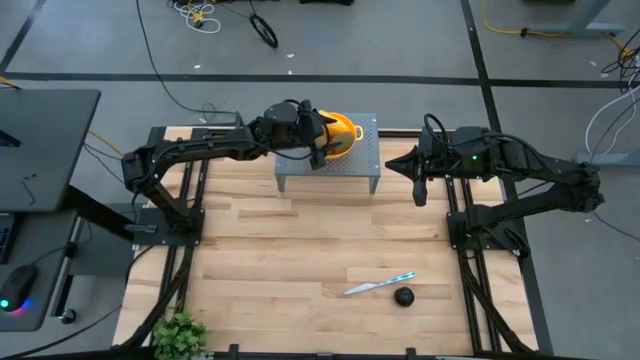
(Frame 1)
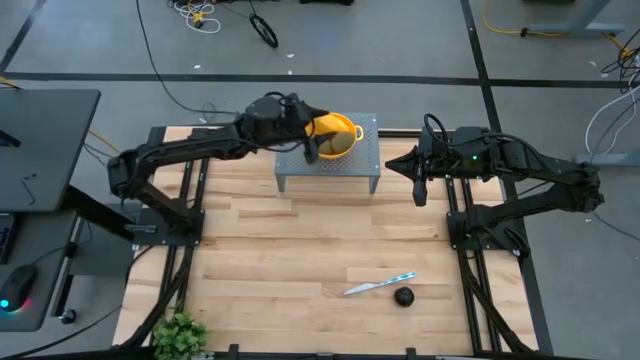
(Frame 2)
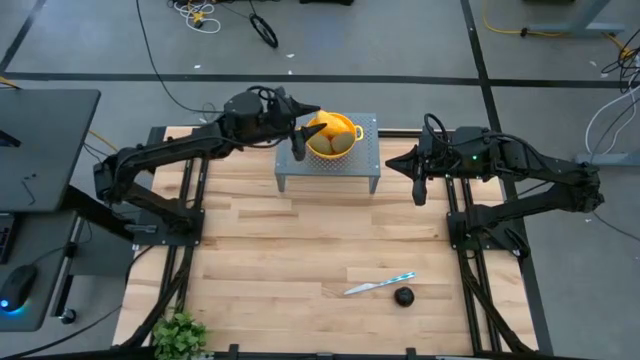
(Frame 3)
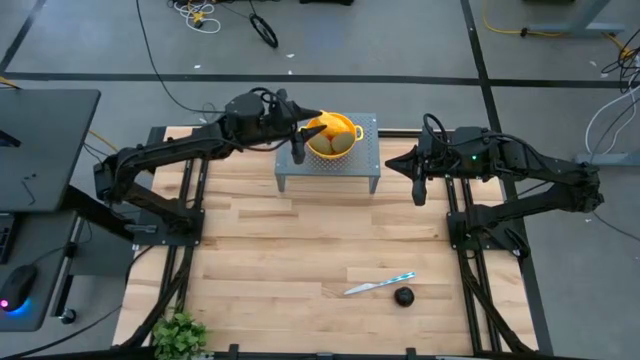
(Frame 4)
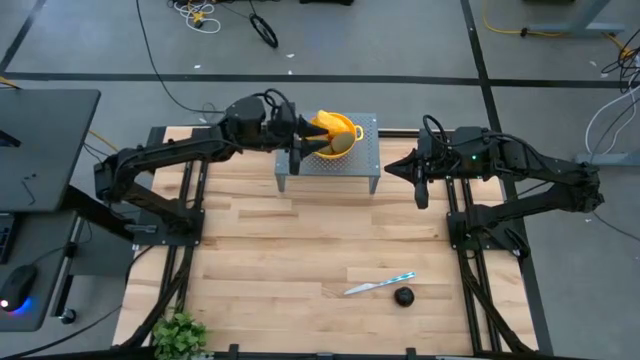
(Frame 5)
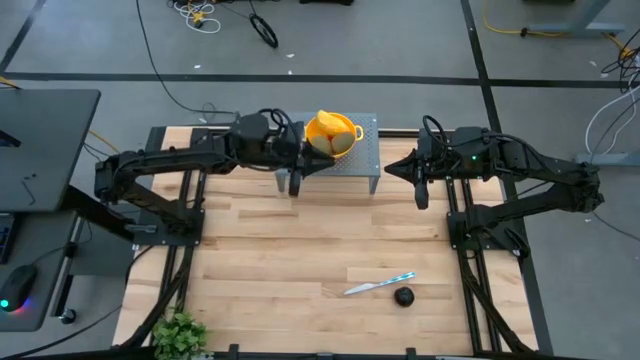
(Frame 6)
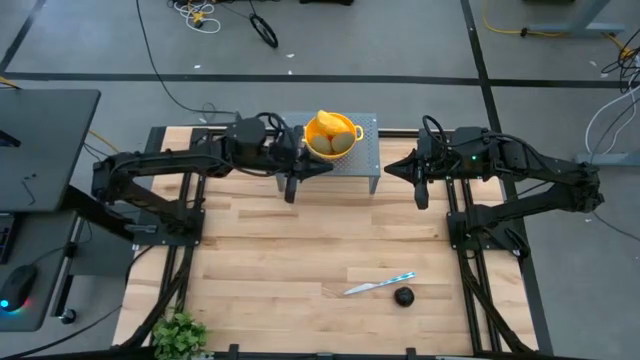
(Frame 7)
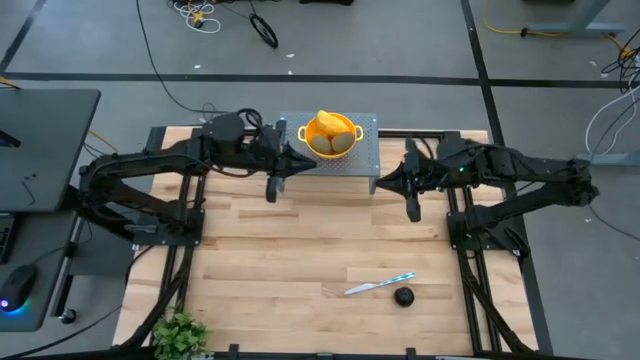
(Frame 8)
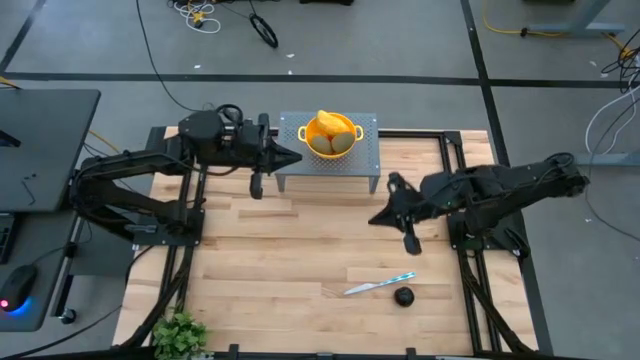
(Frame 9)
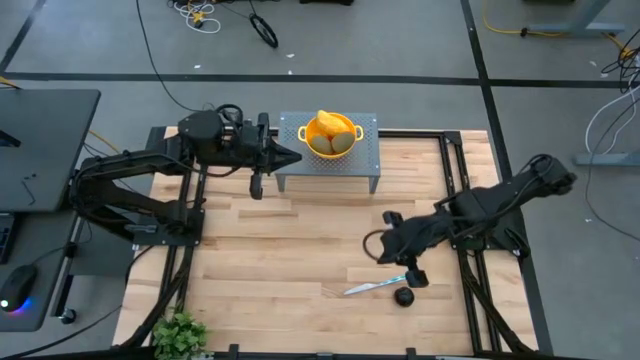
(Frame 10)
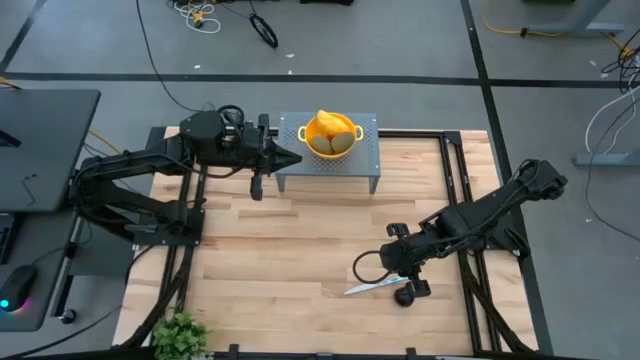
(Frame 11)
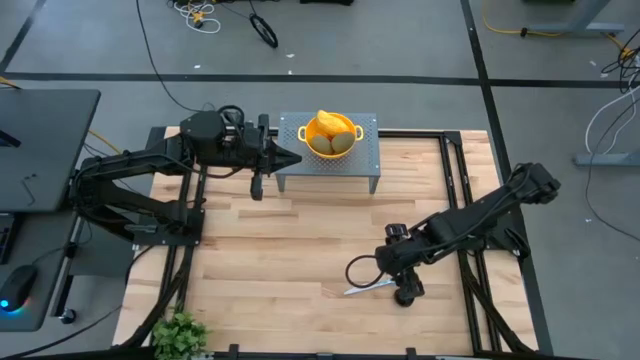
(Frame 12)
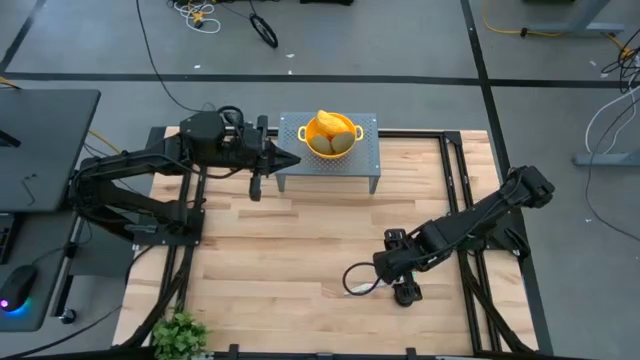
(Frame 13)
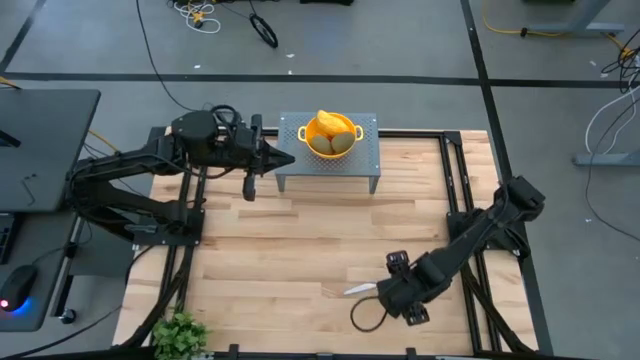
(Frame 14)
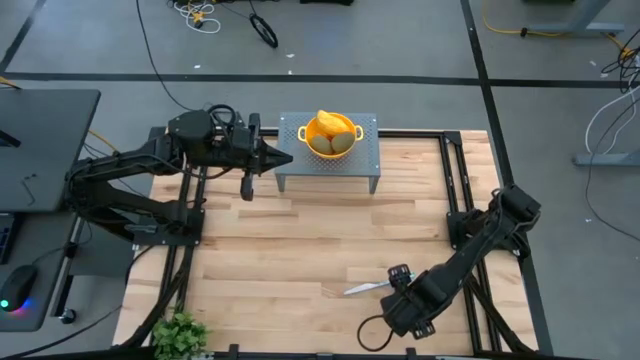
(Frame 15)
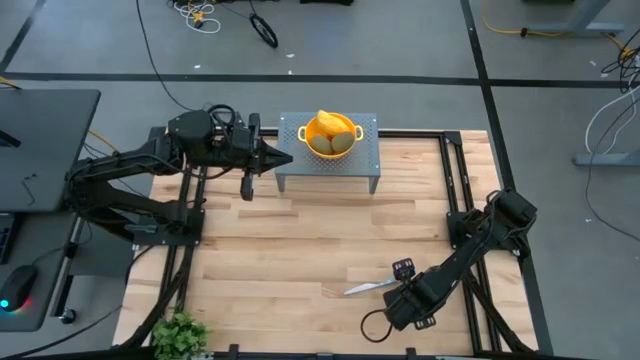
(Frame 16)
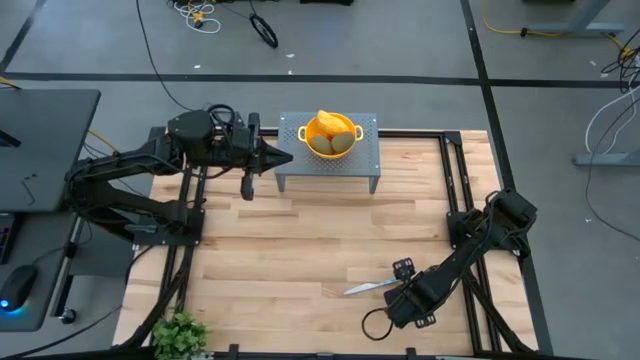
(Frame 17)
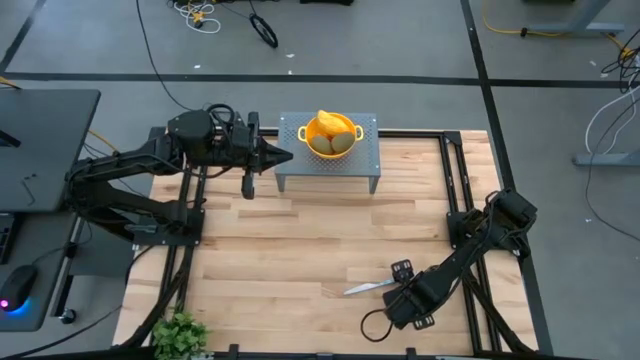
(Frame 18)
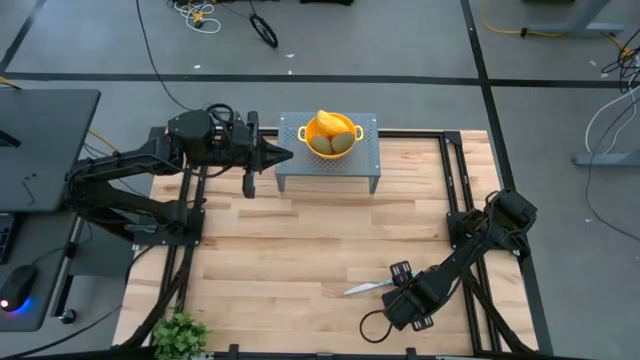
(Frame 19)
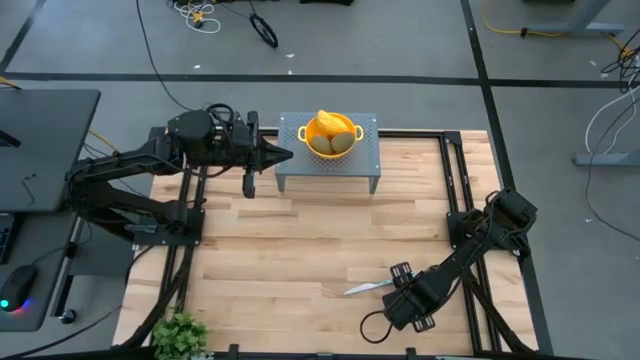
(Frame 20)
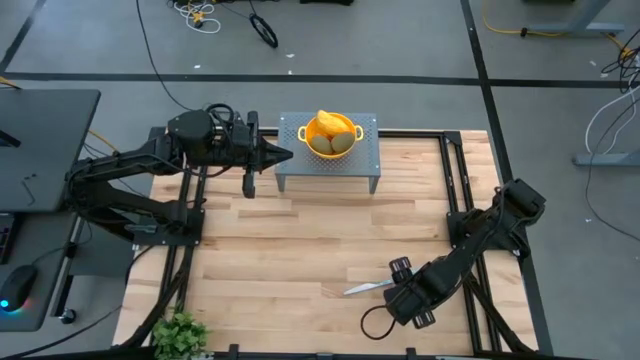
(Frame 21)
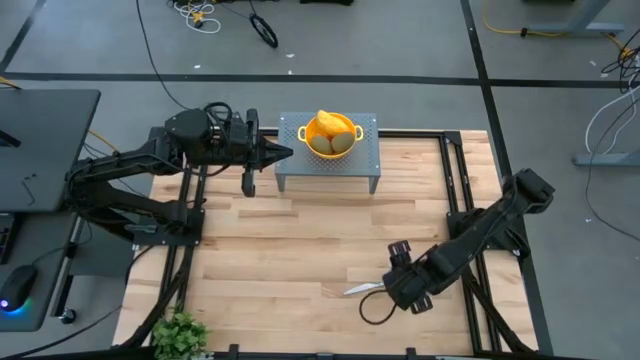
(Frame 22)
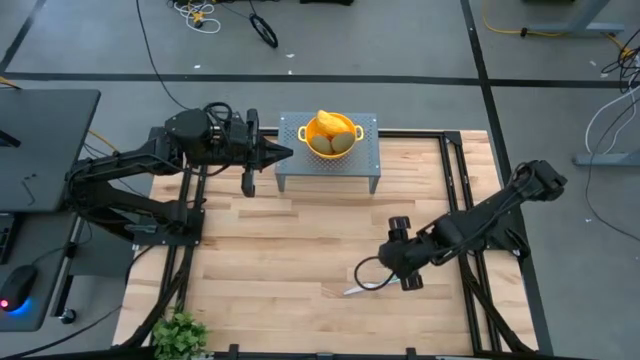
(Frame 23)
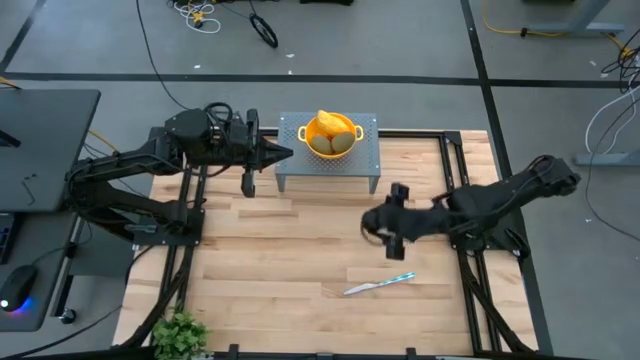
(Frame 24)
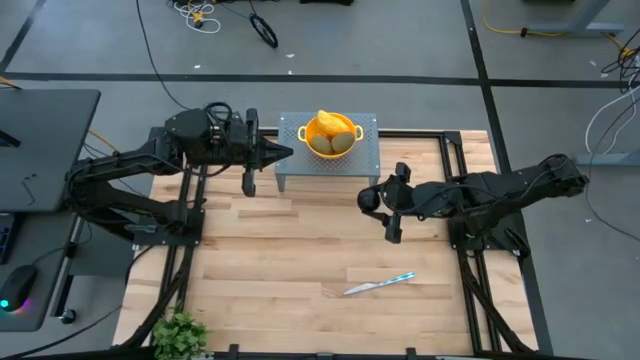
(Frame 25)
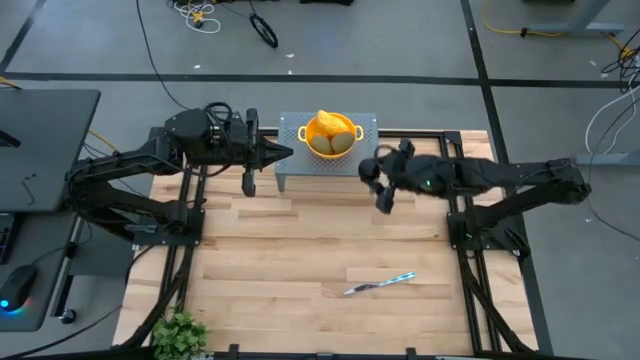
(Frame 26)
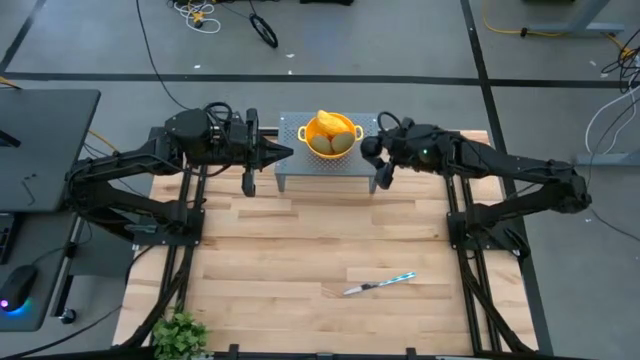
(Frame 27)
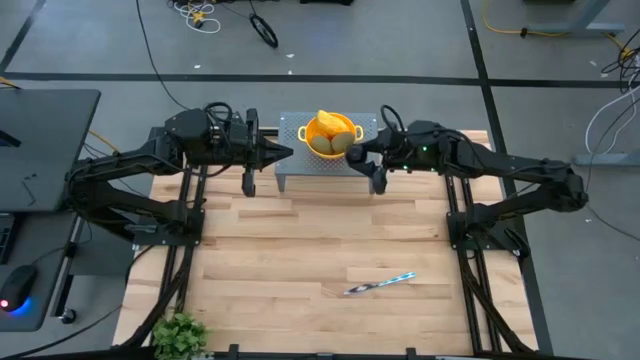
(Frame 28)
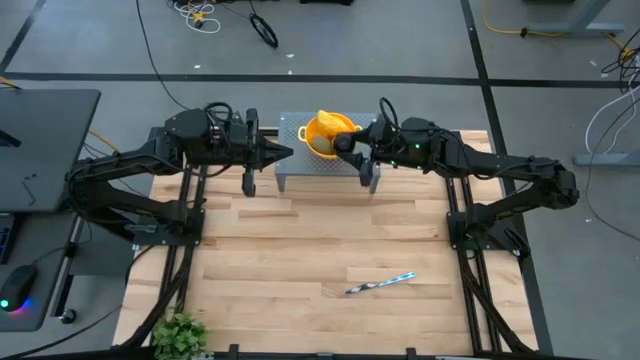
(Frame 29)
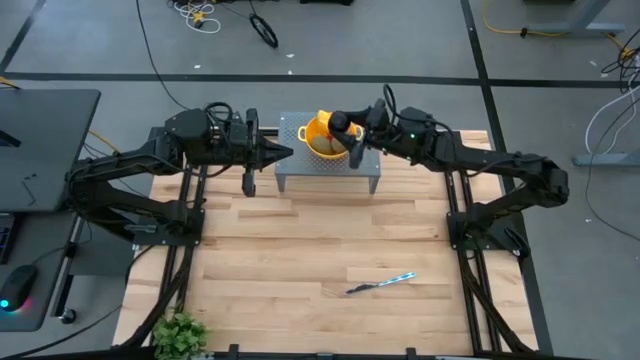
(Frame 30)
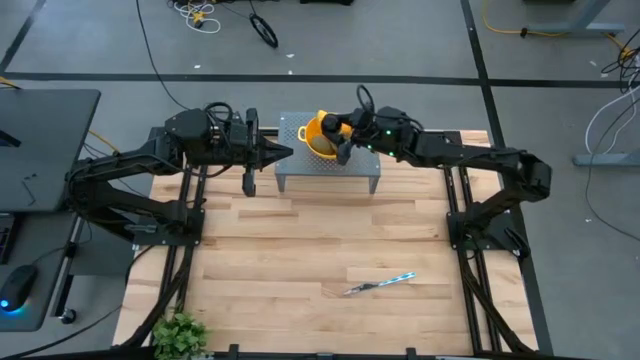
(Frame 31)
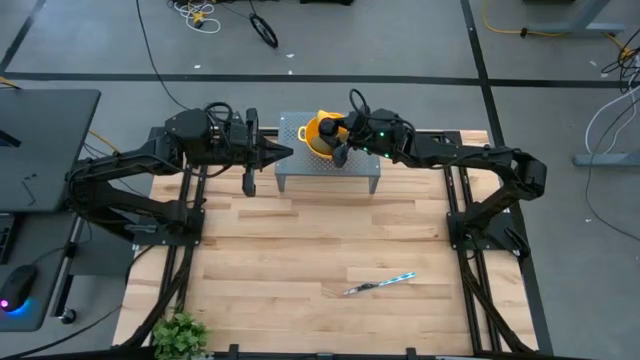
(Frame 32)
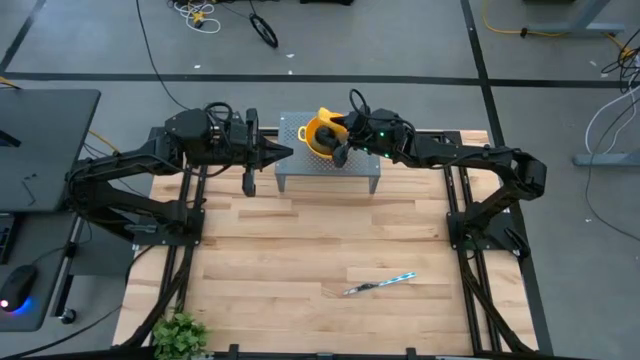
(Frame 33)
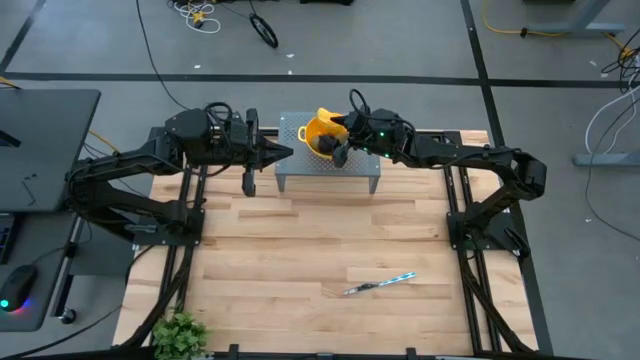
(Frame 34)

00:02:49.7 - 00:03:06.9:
Task: Pick & Place Fruit
Put the black plum into the yellow strainer bowl on the shelf

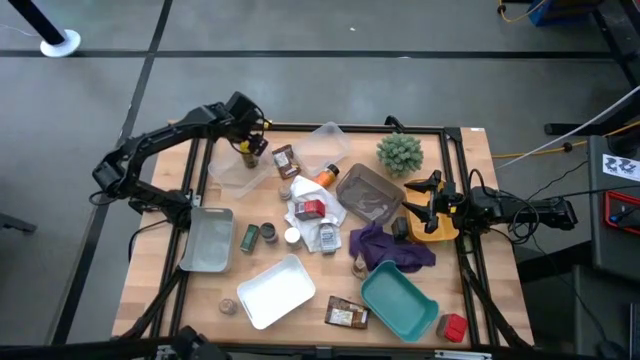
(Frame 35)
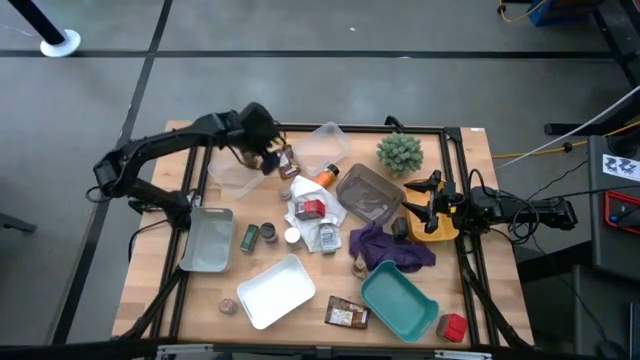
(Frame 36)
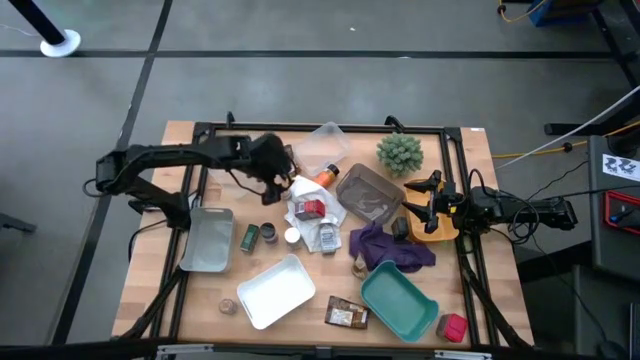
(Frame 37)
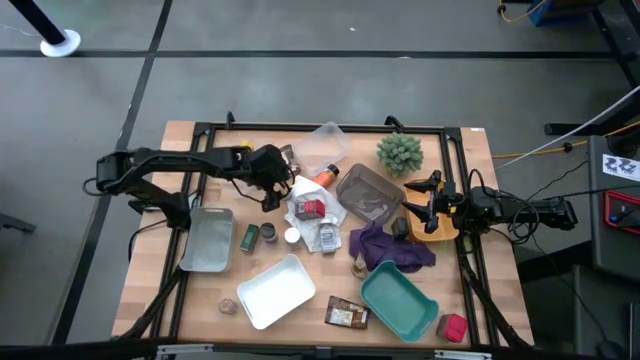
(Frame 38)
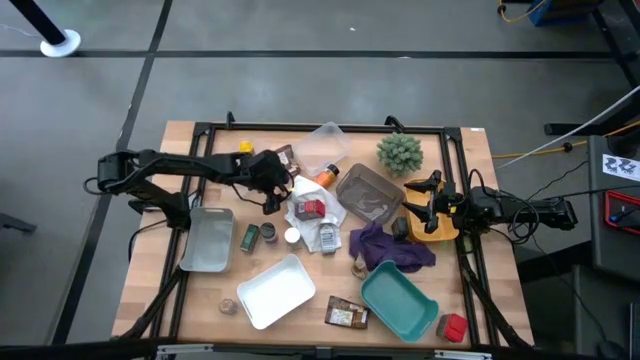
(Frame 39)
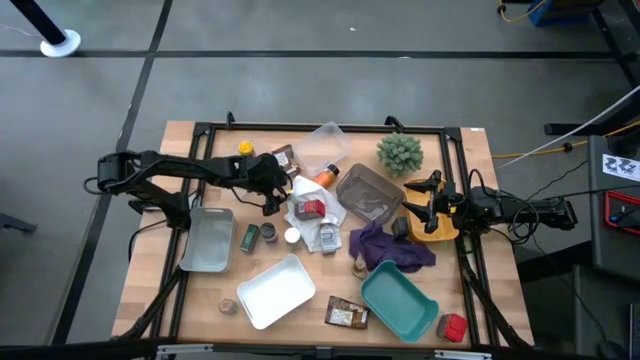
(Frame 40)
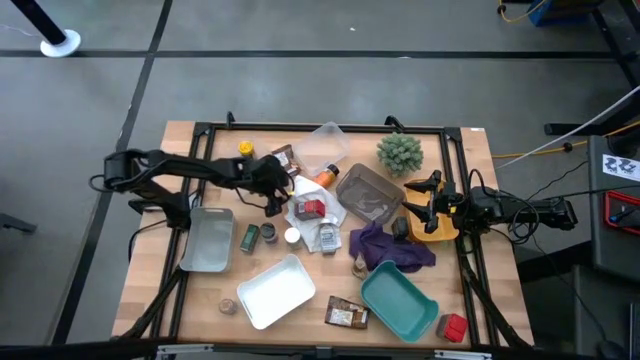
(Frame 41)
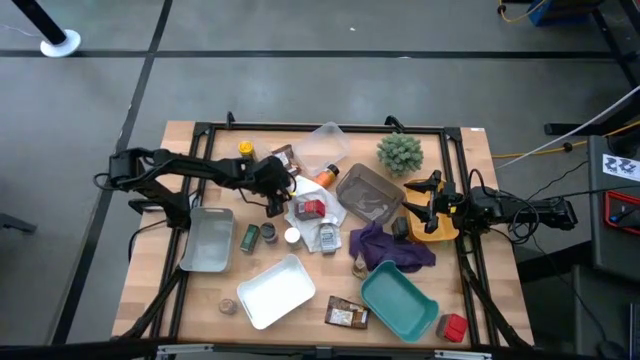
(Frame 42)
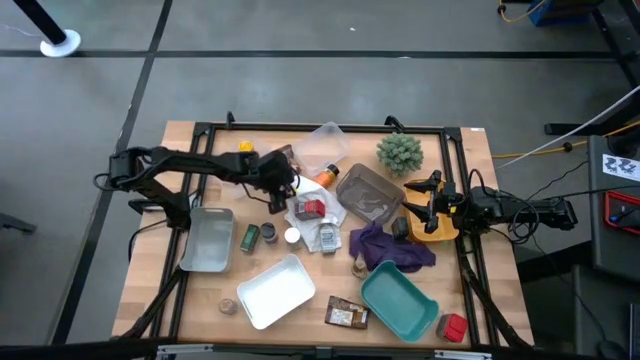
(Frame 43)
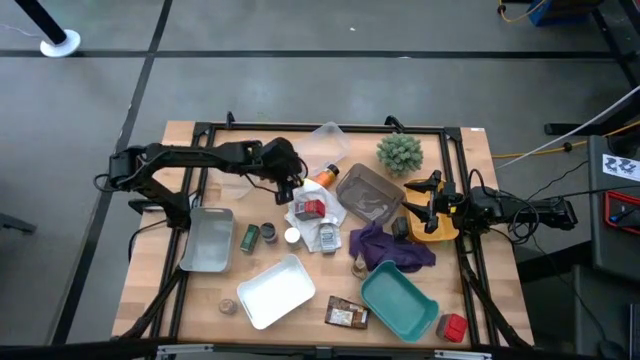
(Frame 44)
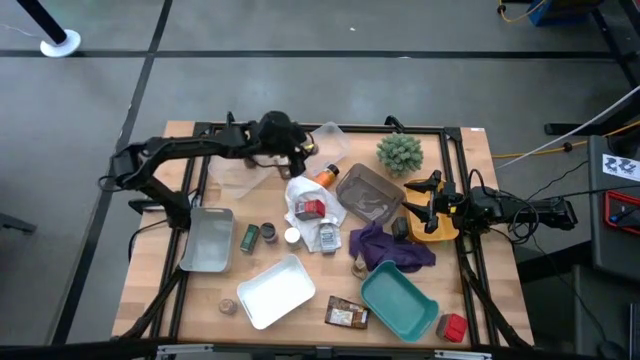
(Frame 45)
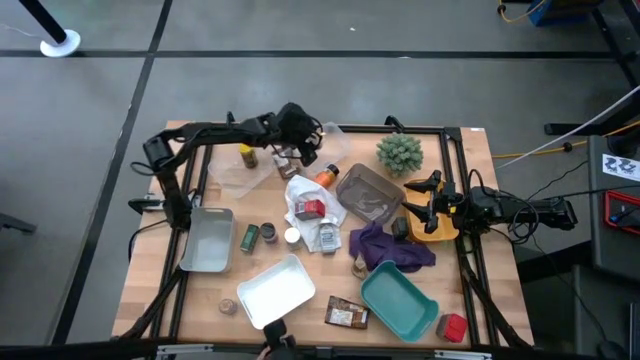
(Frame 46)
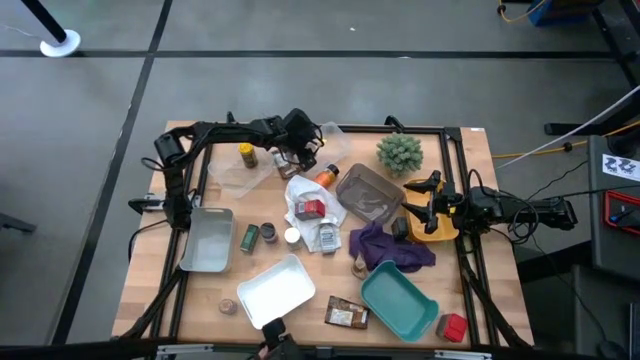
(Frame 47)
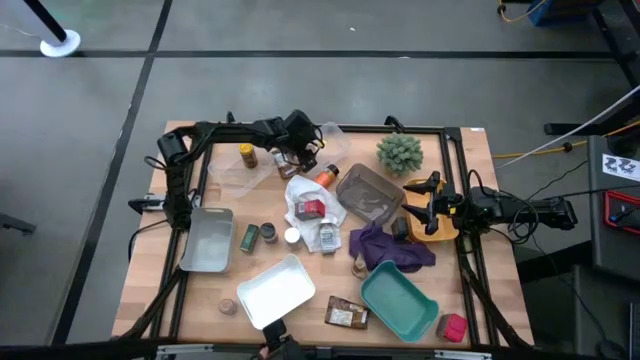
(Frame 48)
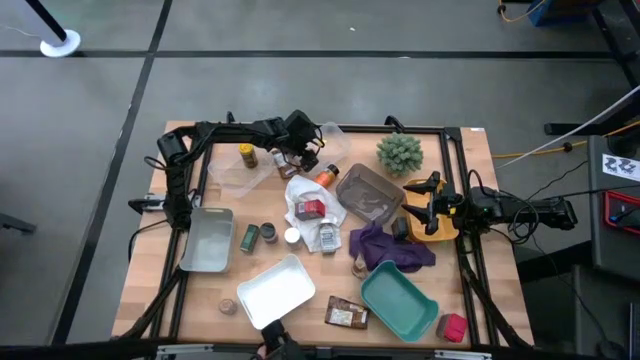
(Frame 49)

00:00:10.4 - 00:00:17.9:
Task: Sort spices by type
Put the top brown spice bottle into the right transparent bin
